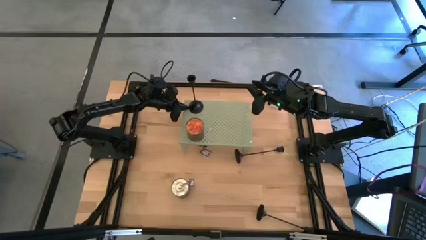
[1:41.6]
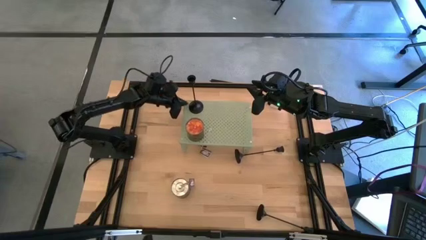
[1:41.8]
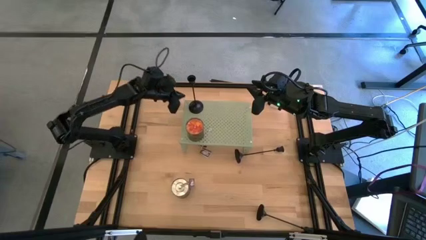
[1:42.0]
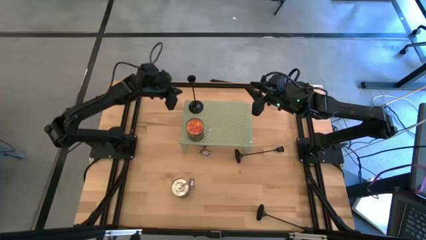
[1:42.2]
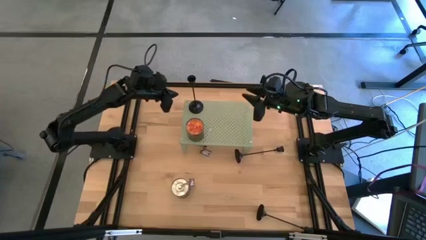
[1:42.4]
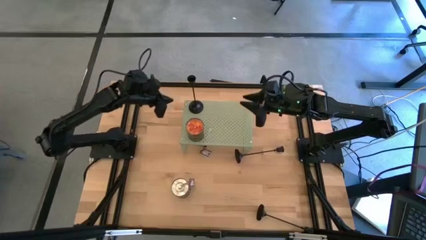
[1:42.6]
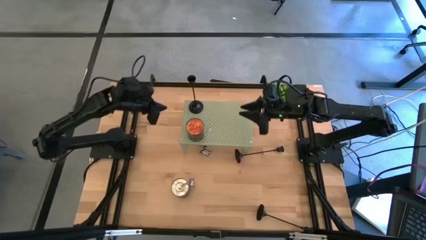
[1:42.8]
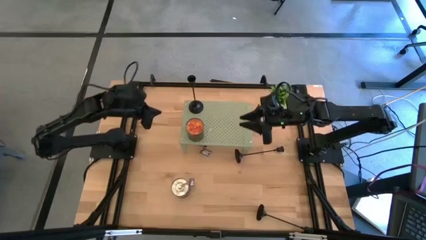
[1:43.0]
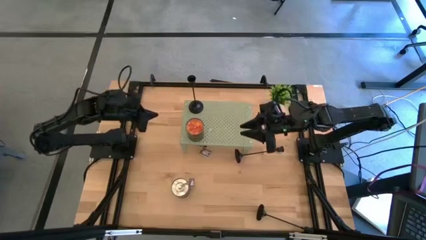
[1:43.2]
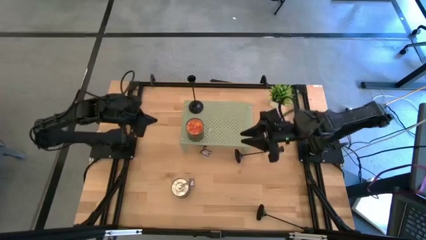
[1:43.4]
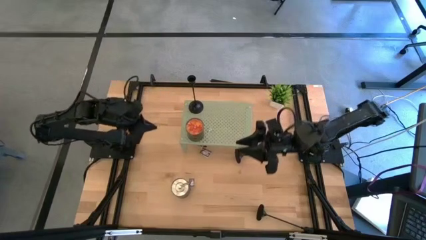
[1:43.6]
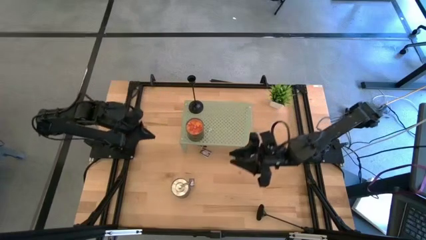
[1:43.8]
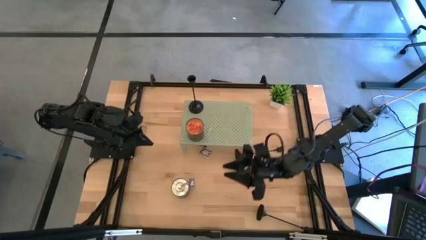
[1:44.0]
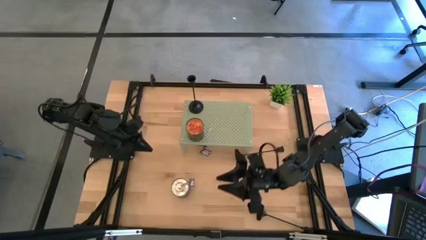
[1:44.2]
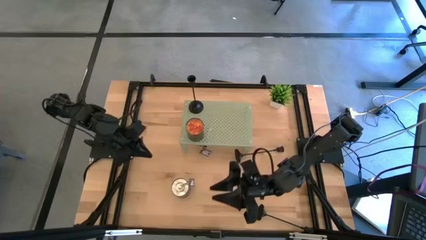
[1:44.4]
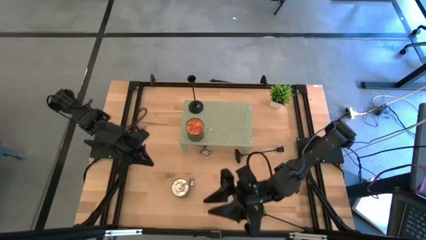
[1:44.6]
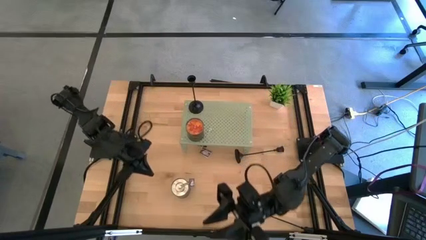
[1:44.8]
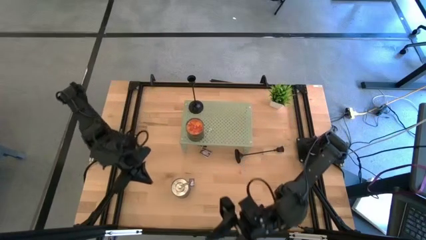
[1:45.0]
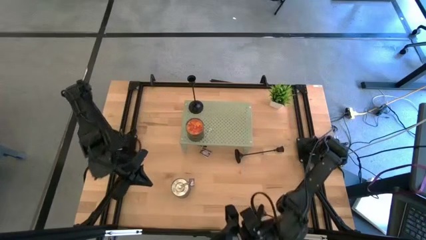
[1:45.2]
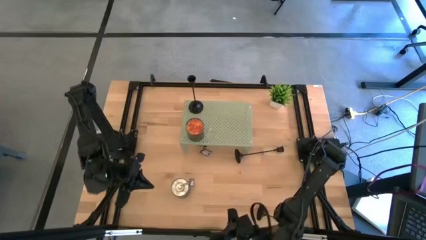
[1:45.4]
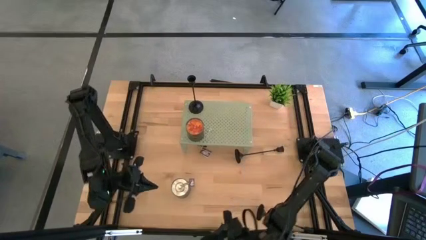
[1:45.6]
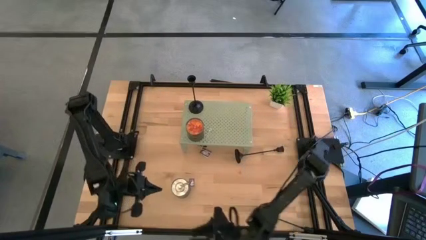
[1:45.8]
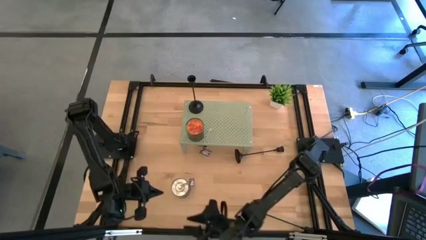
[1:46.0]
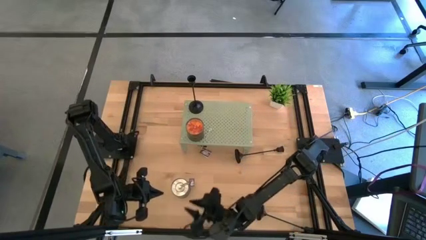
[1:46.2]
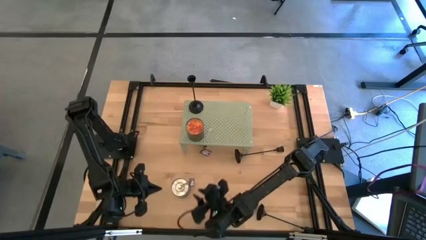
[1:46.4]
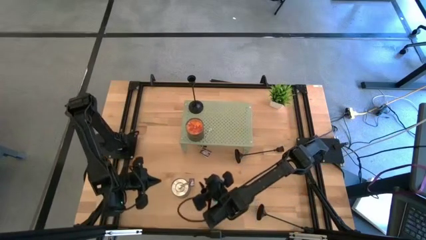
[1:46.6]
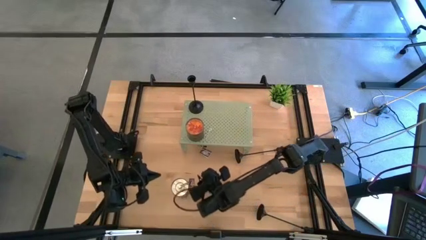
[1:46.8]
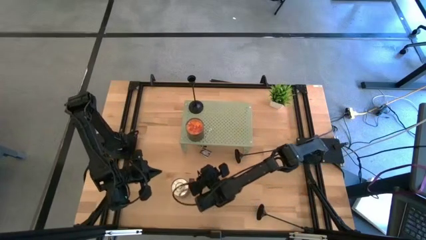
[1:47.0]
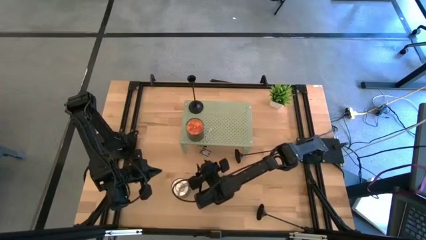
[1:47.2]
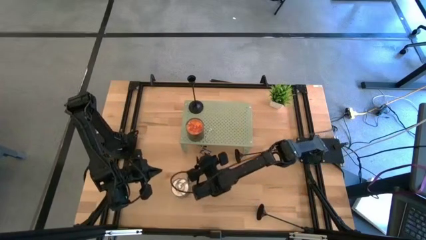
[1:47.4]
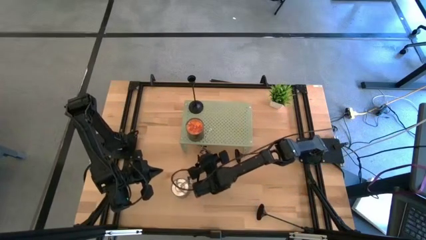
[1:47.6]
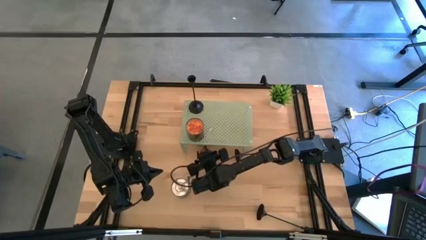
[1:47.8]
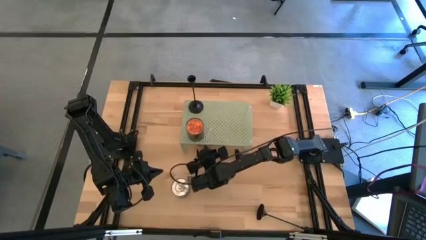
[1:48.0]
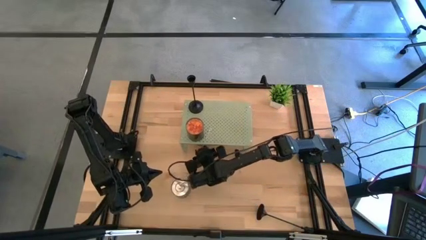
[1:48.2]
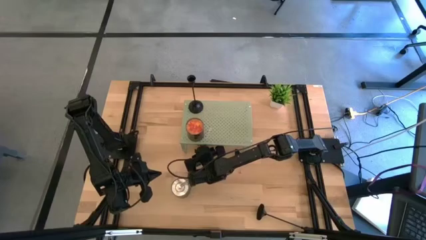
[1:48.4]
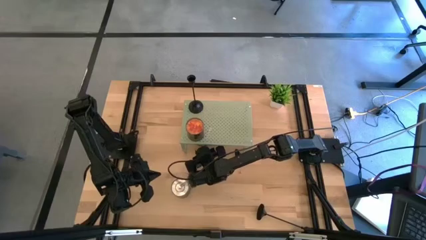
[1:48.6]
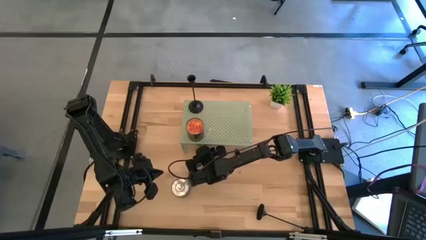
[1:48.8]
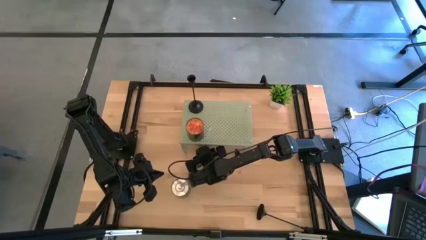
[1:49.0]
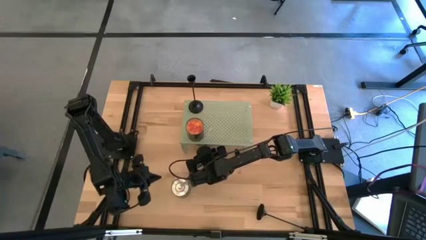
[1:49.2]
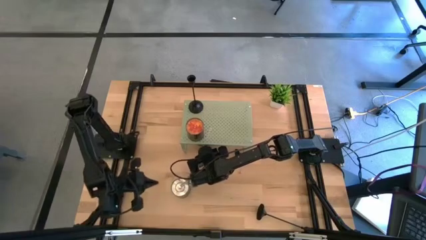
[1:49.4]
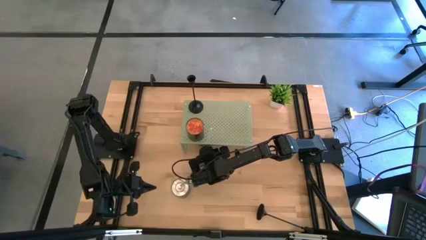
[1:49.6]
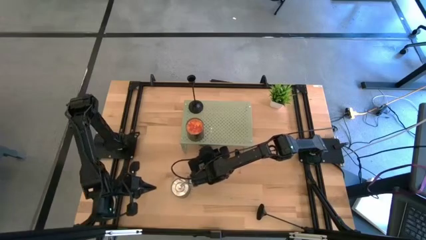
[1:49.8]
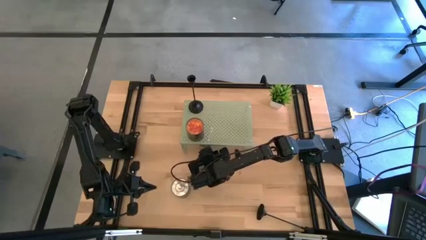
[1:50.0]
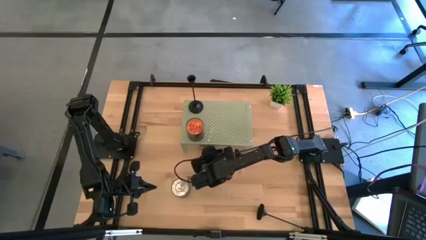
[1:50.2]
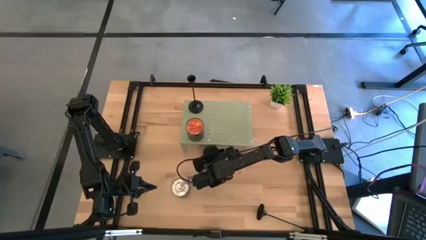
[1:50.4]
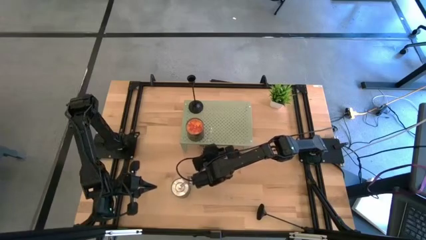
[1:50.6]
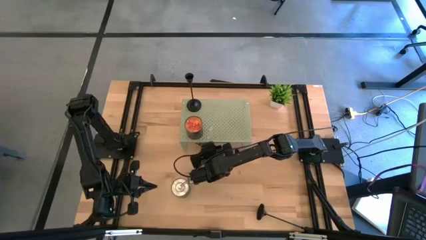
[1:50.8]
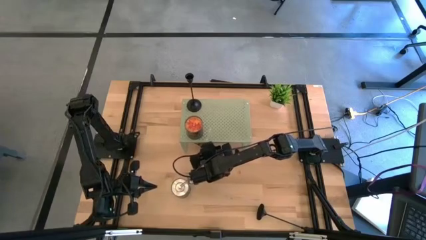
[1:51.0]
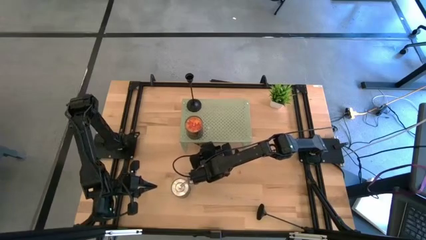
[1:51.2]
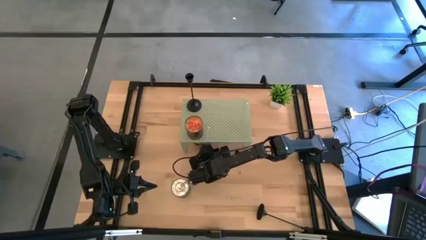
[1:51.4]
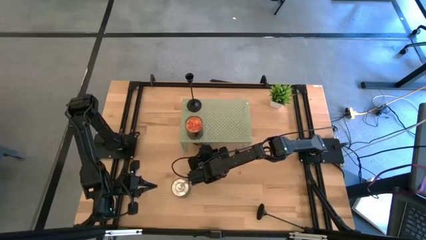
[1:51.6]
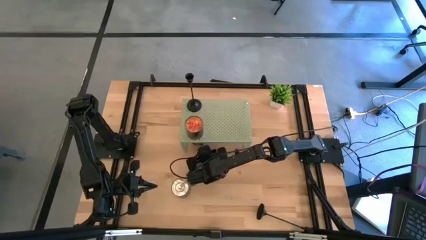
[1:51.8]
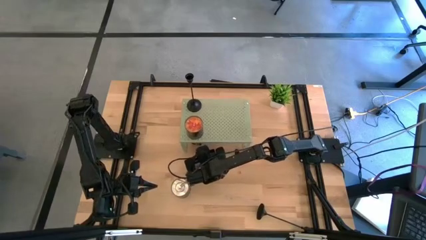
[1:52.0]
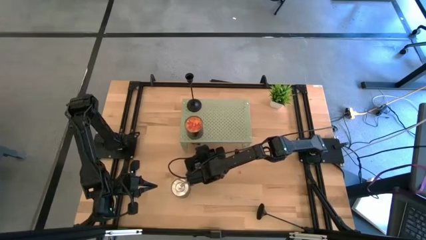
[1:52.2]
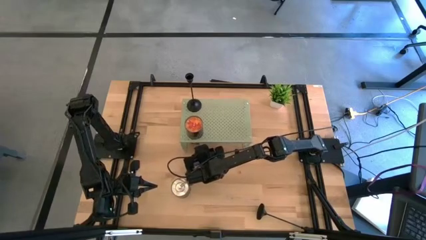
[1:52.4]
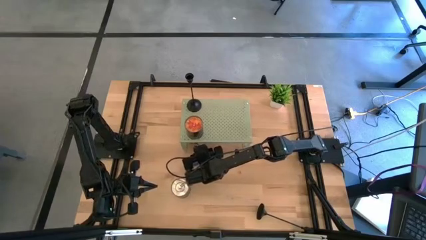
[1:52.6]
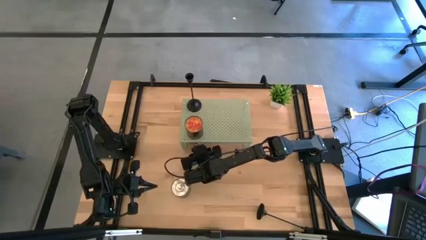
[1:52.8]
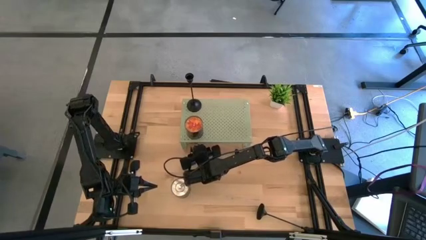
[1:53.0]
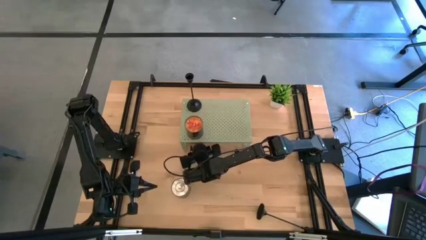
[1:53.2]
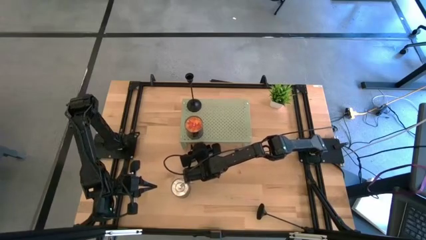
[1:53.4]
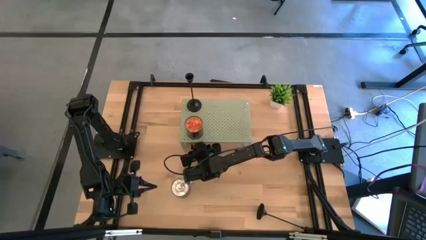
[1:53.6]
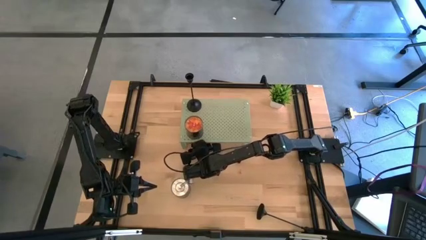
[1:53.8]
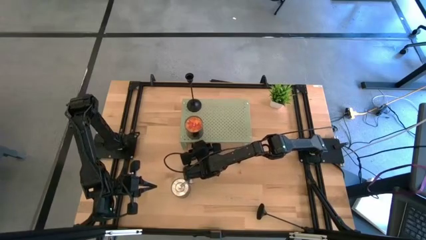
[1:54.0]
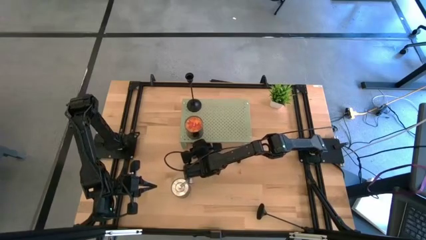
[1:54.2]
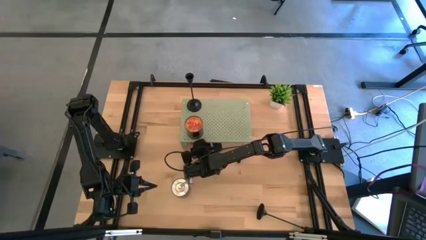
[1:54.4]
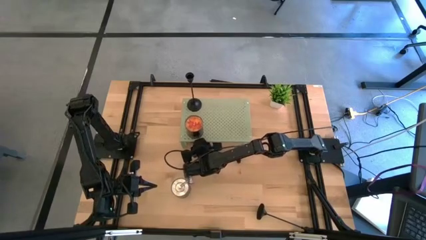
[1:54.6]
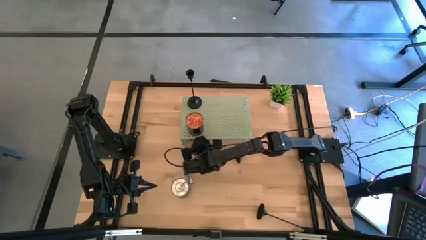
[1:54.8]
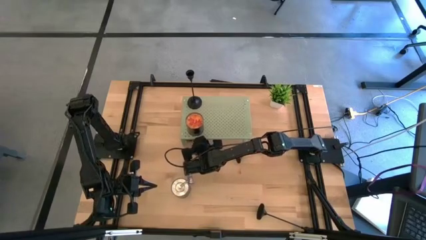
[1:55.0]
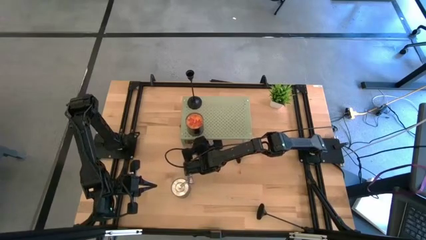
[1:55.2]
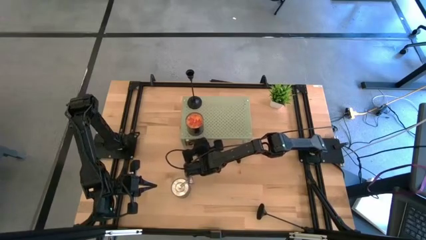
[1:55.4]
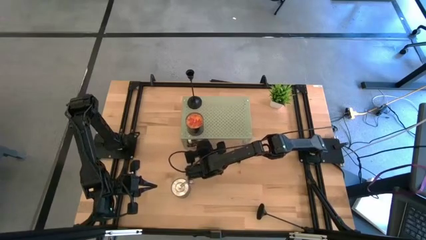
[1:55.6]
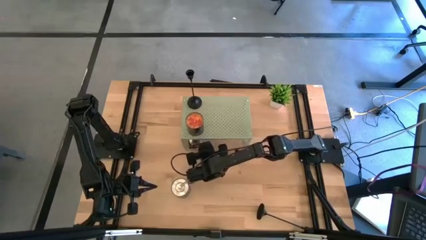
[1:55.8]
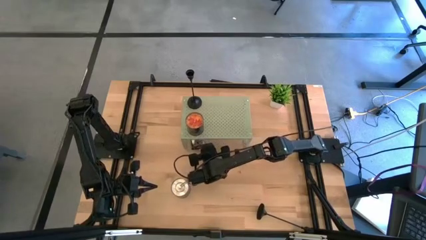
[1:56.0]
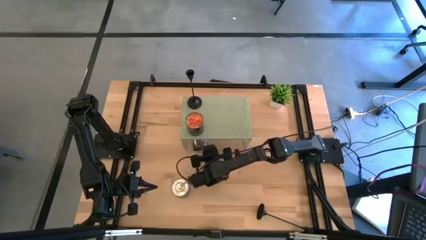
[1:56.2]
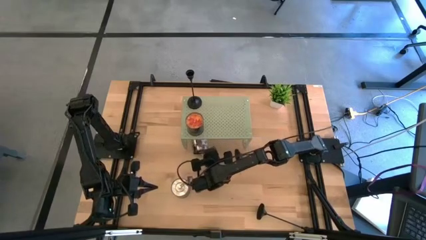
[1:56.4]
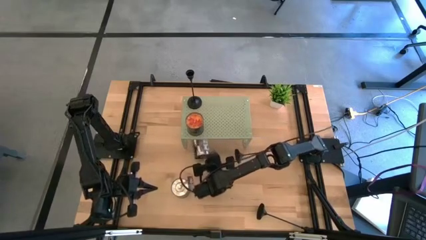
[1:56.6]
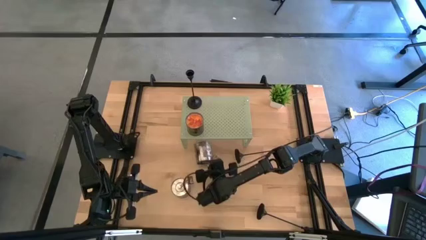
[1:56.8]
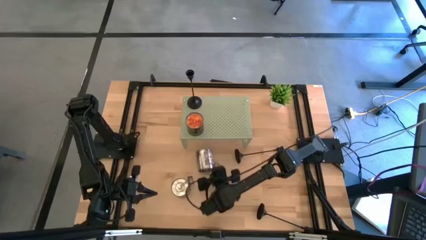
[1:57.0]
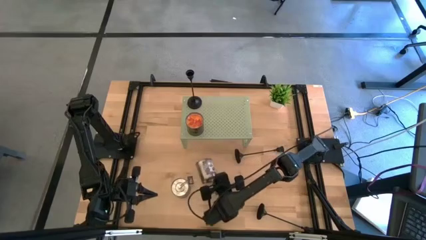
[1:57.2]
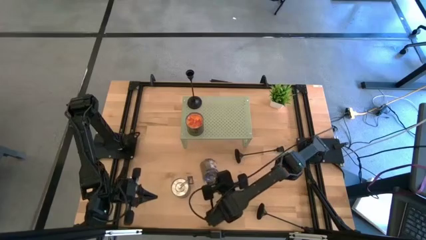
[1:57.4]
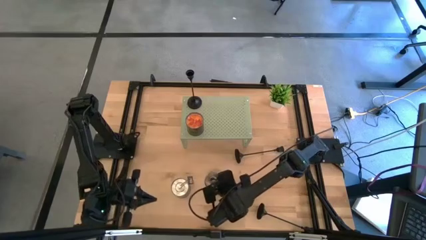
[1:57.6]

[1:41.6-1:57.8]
Task: Pick & Place candle stick holders
Put the top brown scented candle on the shelf aligned with the other scented candle

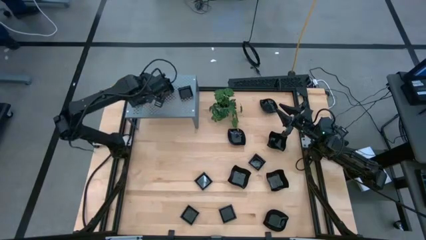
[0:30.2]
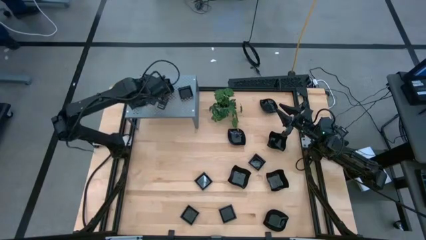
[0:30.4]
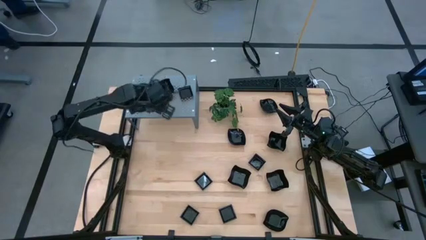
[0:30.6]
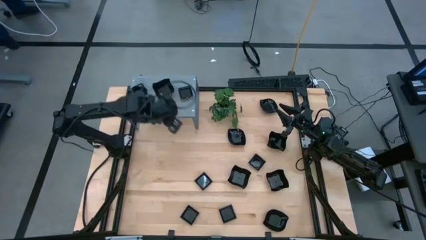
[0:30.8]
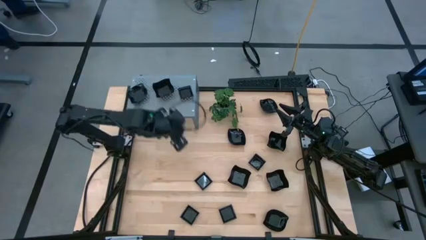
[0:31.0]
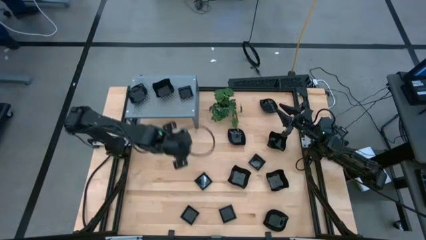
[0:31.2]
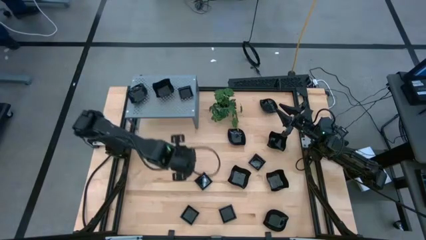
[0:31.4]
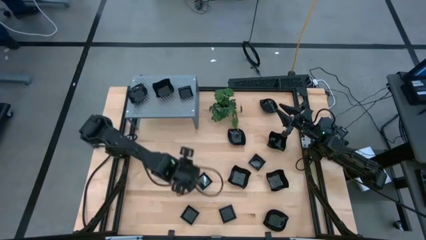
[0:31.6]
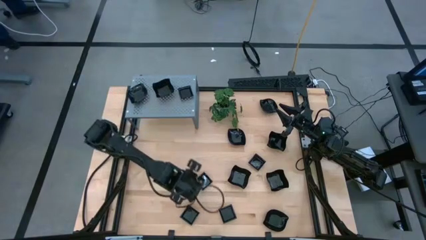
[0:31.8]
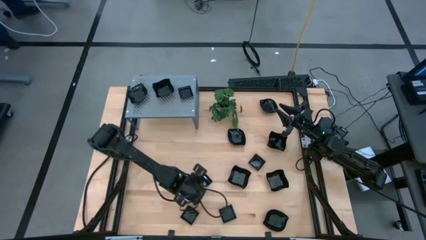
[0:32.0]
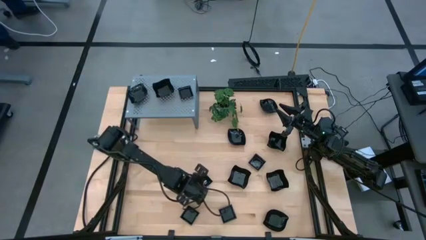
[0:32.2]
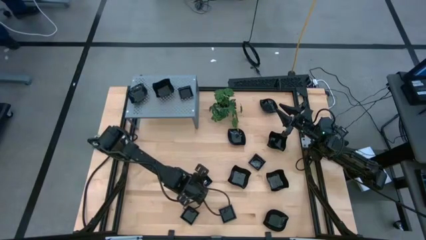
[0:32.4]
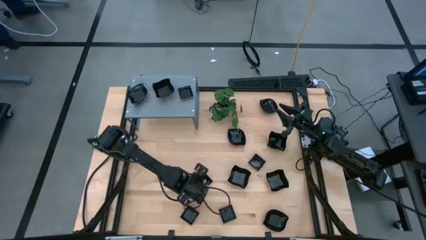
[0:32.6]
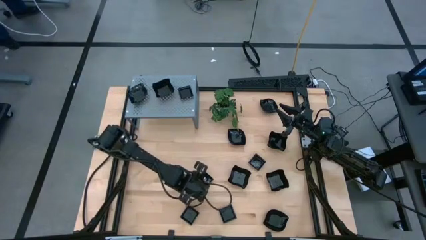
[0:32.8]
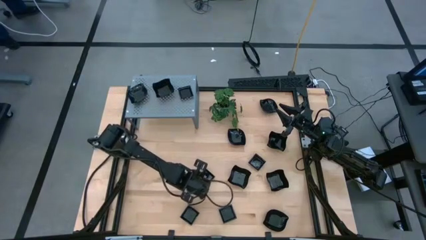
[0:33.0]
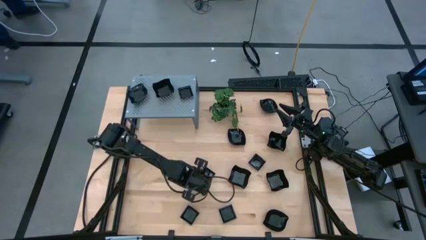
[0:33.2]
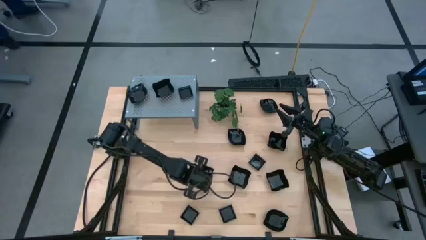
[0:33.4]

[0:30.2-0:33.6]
Task: Pick & Place Mini shaped plates
Stack the black leaf plate on top of the black leaf plate on the shelf
